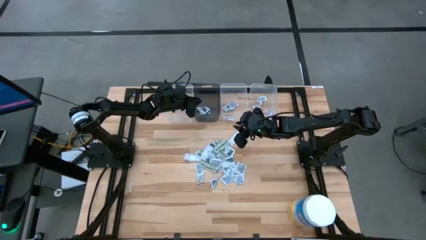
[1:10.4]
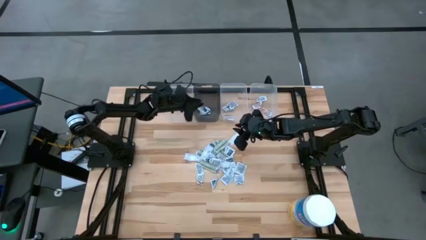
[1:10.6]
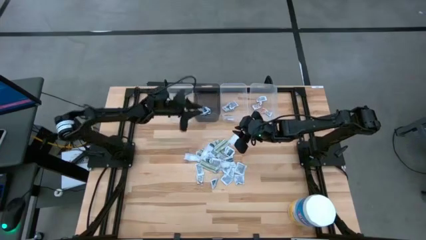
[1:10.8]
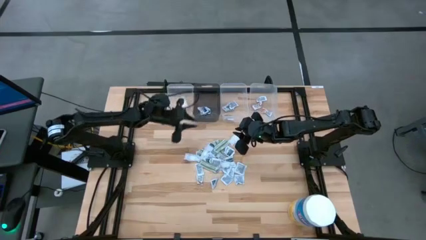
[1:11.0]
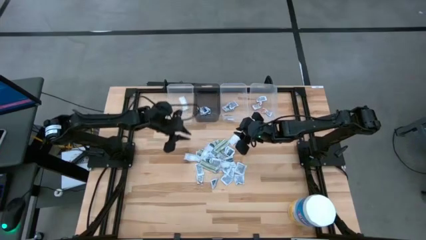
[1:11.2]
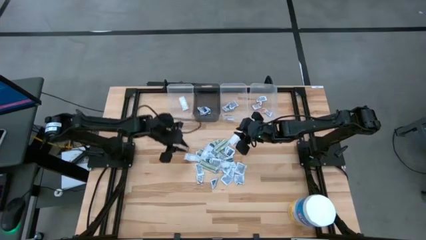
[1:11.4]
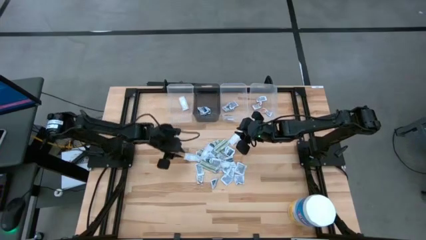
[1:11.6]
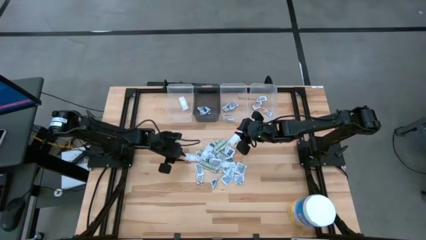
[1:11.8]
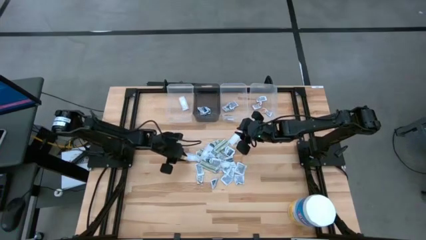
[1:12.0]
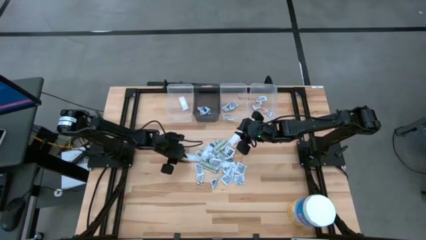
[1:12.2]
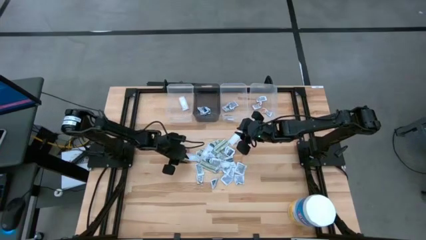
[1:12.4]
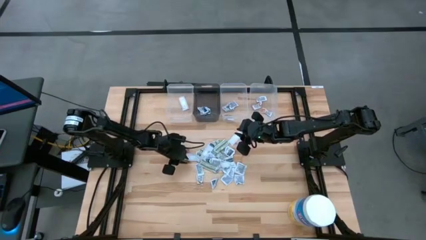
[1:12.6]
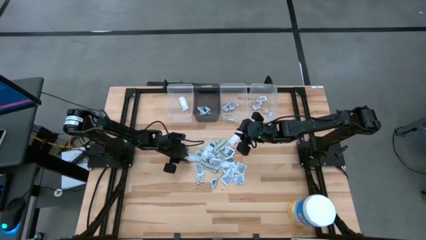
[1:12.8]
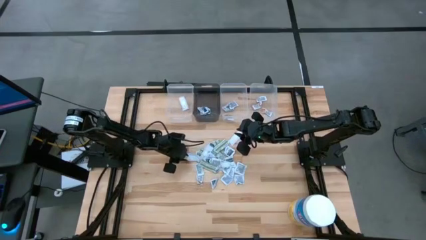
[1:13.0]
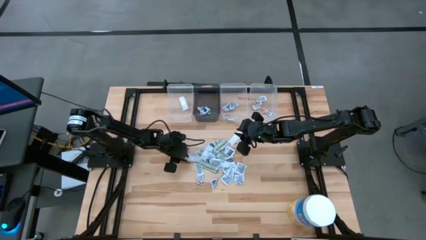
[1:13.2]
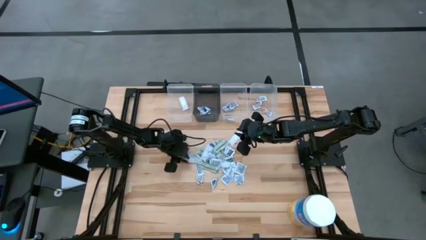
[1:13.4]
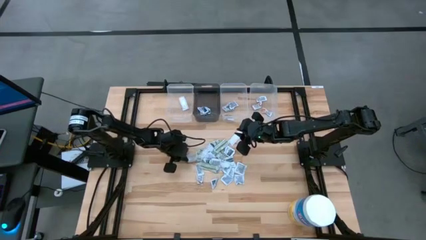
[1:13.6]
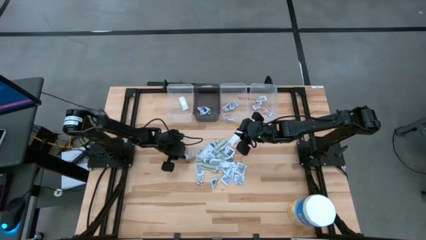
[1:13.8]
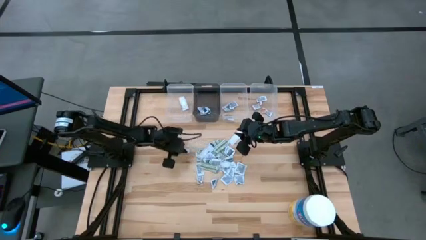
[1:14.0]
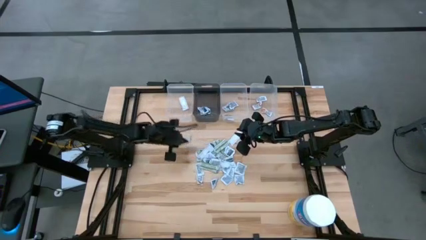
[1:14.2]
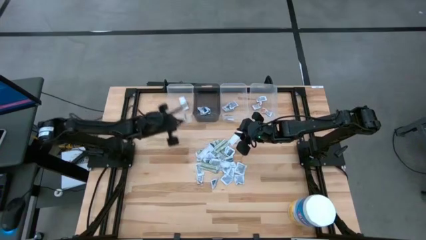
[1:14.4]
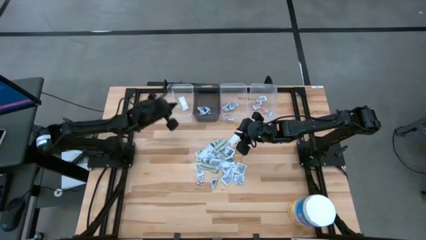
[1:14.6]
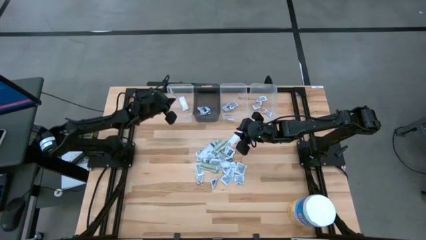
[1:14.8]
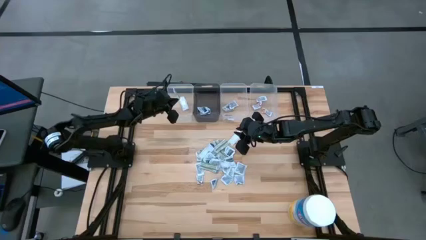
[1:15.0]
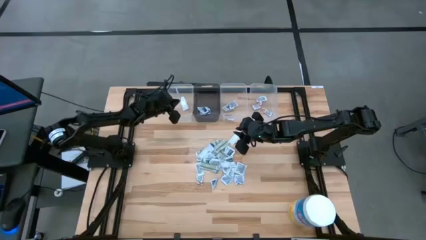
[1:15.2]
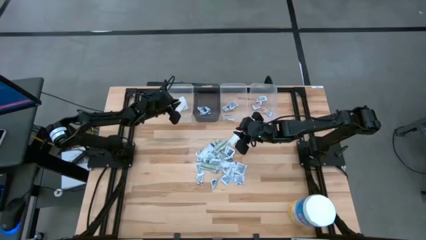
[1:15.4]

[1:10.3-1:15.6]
Task: Pick & Place First Aid Supplies
Put the bandage into the left transparent bin

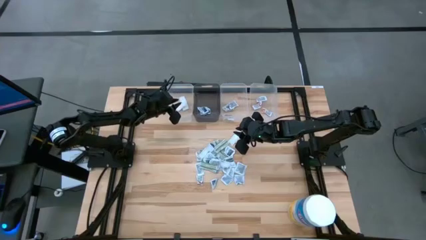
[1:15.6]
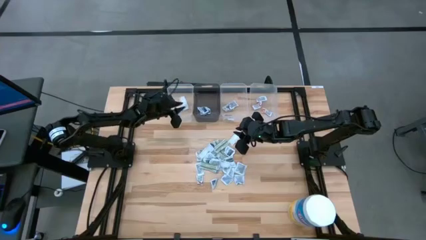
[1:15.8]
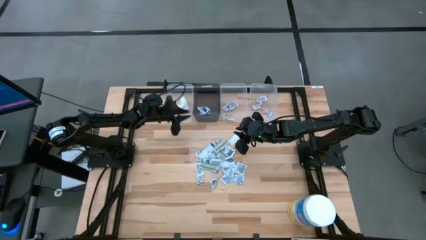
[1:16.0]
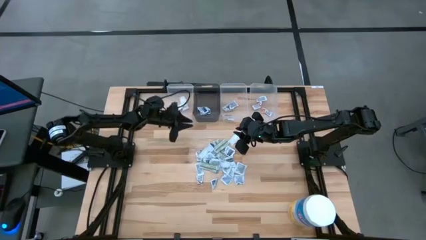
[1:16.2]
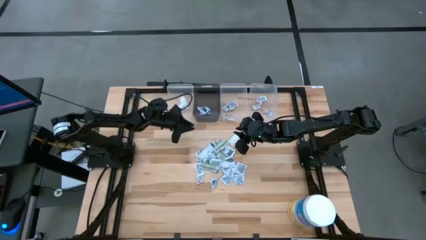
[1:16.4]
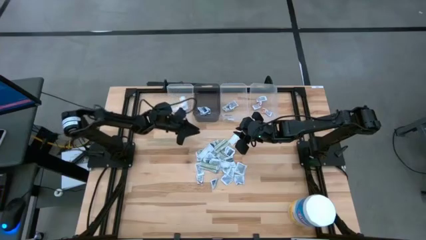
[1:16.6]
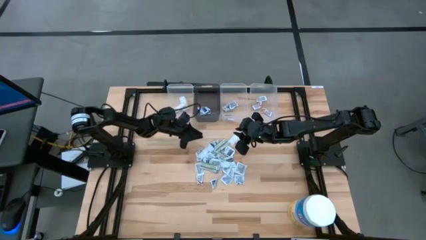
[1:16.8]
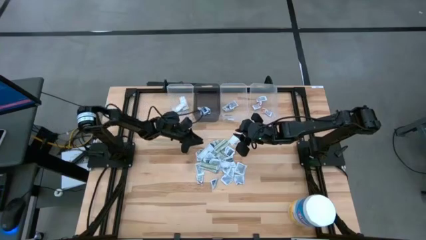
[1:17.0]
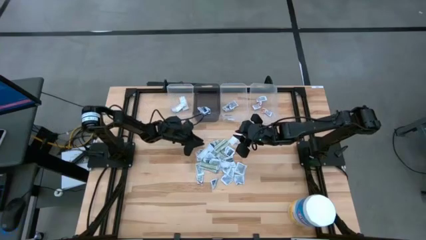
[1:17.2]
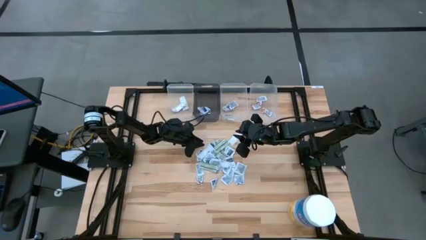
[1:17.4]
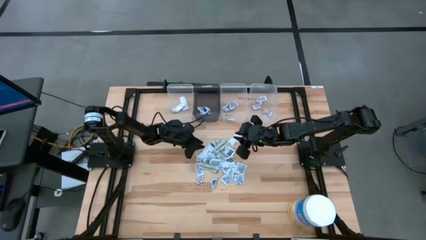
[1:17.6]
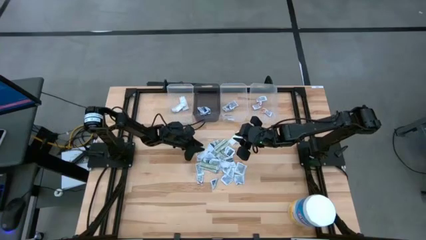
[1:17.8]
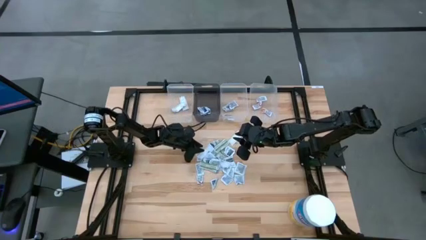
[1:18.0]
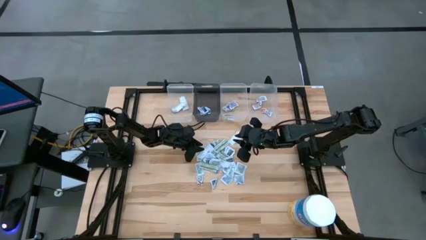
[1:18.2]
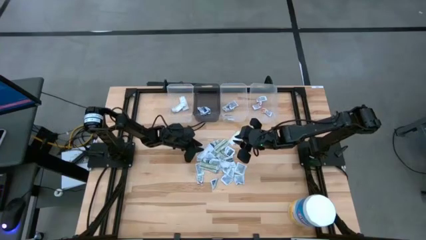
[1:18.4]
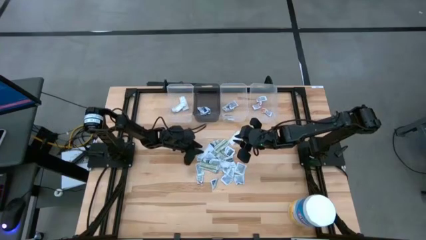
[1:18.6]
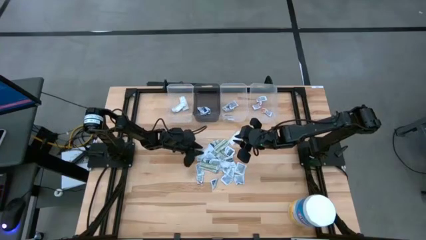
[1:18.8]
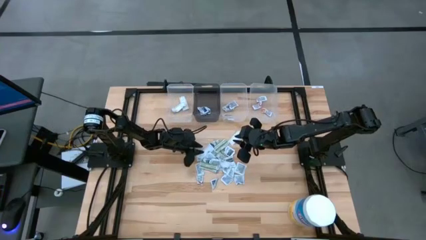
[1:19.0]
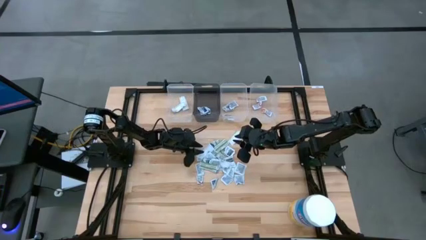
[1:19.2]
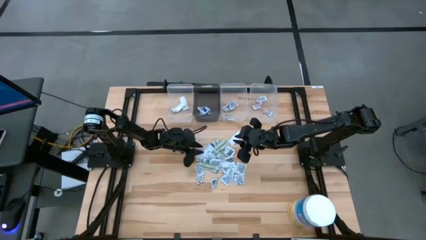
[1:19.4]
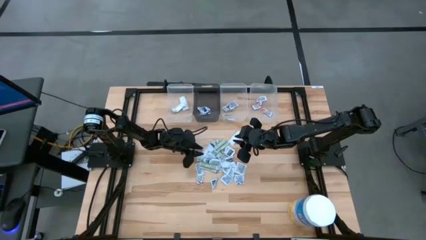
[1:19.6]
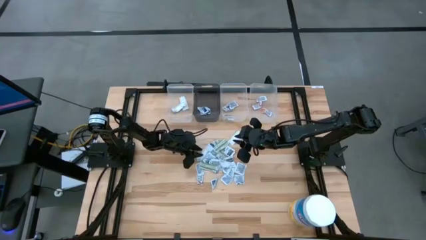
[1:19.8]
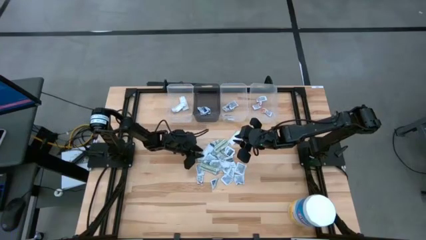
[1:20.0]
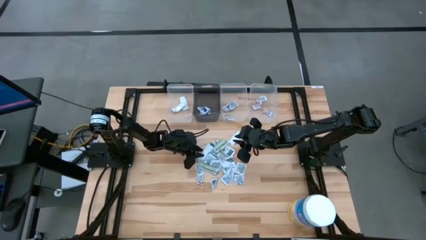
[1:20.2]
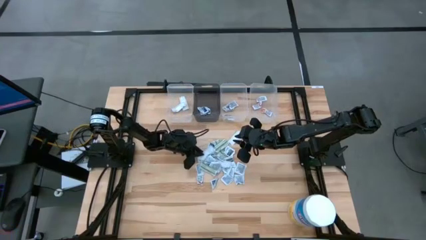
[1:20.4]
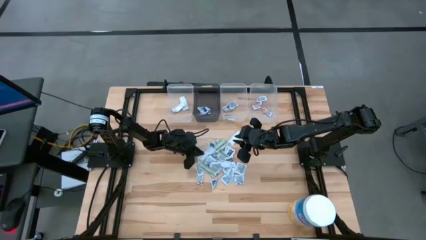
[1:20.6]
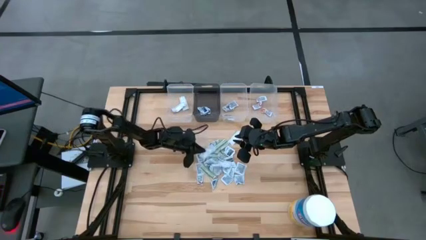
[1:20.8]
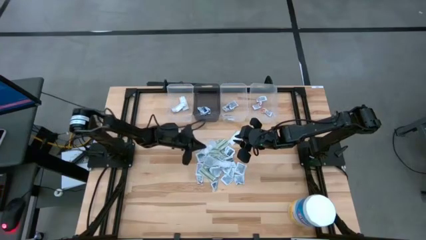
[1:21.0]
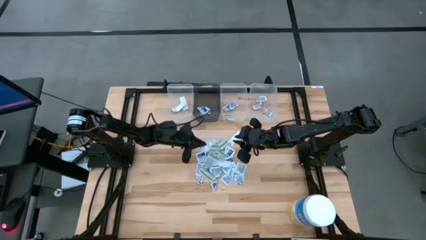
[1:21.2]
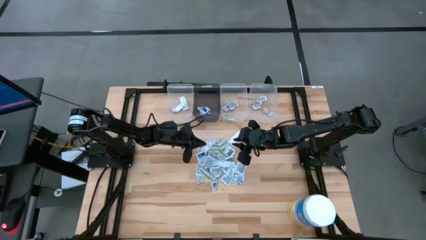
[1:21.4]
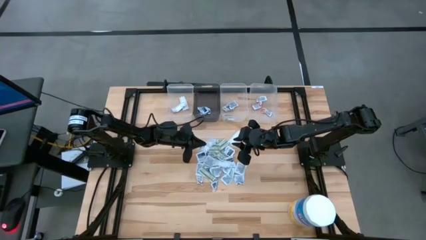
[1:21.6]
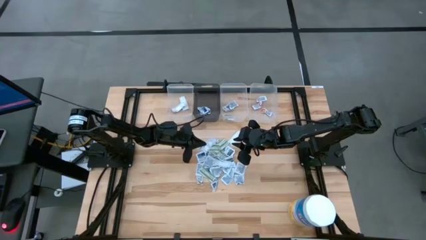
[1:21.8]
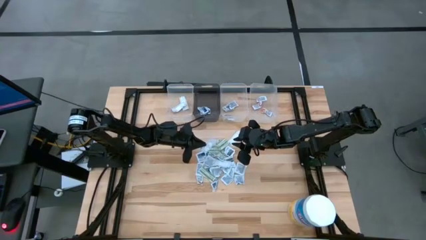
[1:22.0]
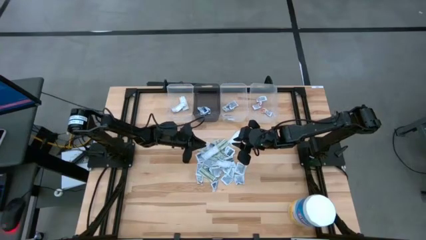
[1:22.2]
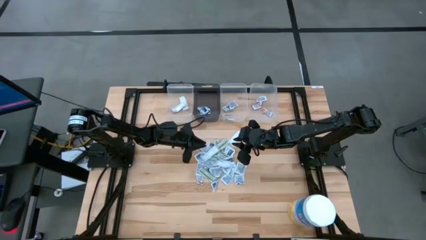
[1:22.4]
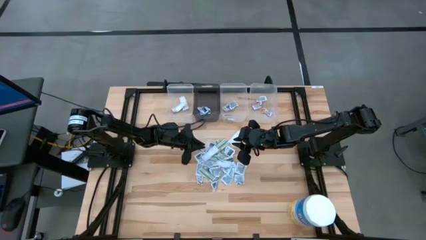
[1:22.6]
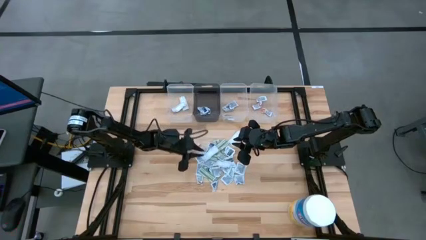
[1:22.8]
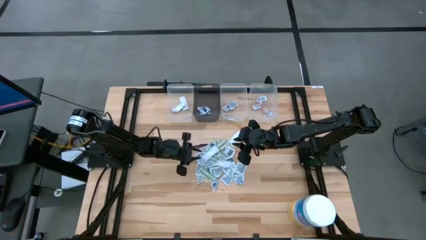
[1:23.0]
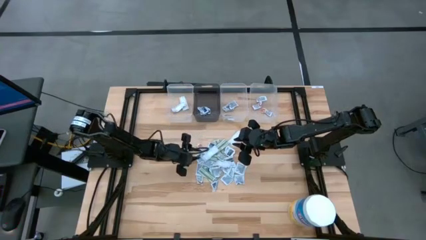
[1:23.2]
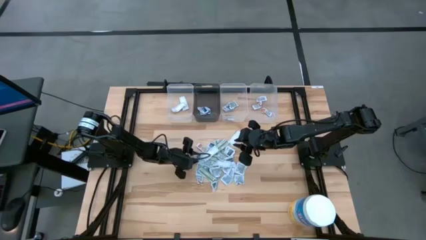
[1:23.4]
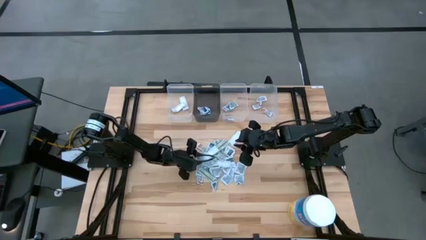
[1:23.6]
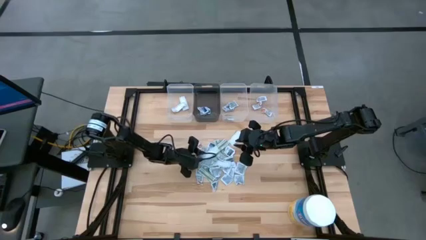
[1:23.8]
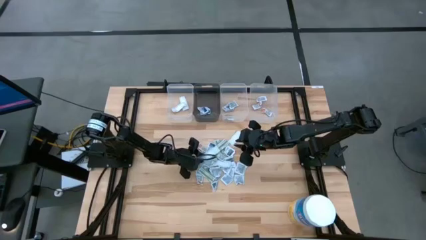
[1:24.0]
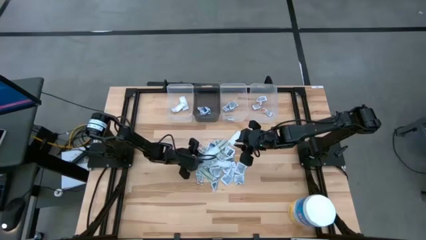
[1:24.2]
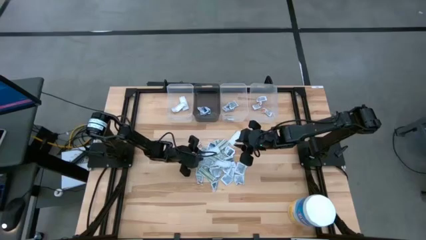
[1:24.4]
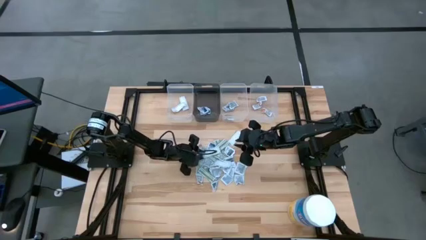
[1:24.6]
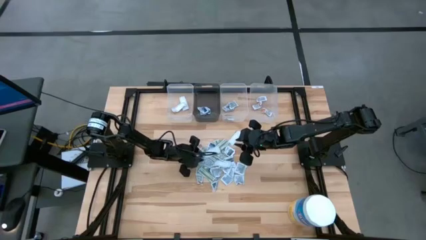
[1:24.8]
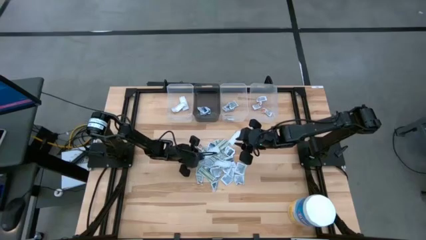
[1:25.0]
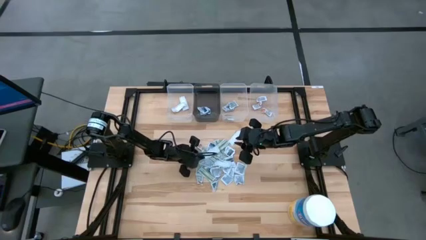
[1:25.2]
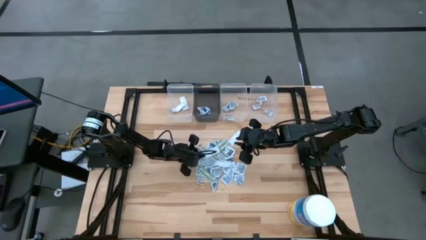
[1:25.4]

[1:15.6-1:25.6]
Put the bandage into the left transparent bin
